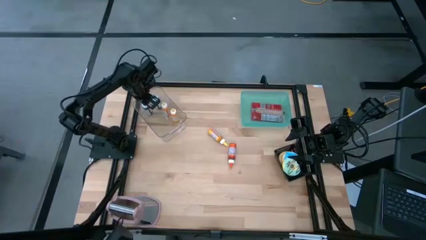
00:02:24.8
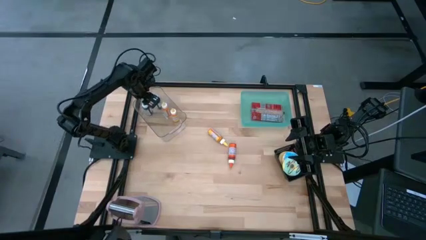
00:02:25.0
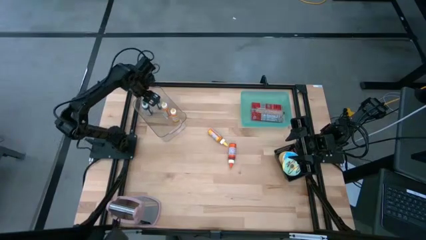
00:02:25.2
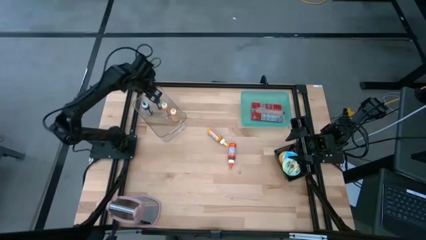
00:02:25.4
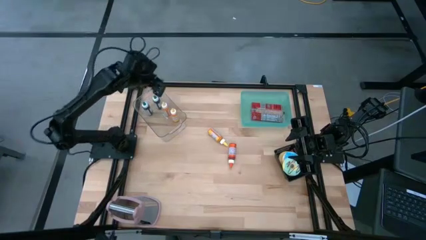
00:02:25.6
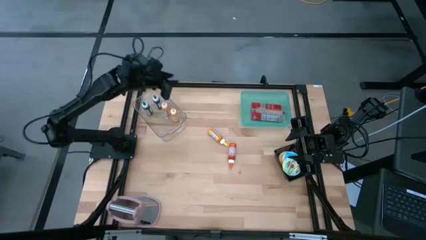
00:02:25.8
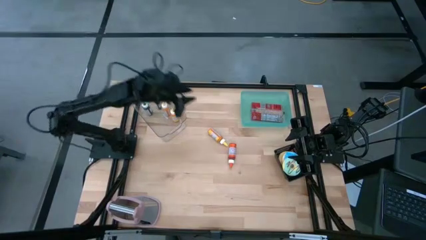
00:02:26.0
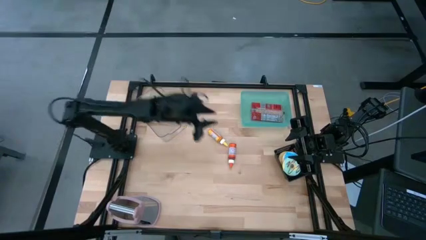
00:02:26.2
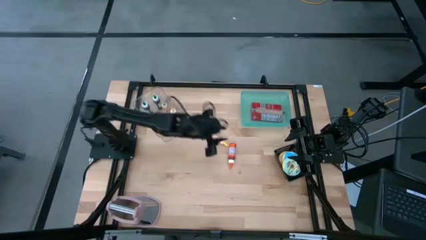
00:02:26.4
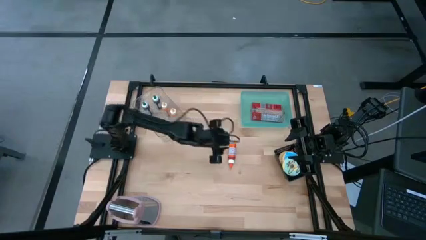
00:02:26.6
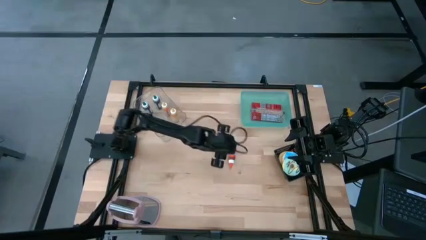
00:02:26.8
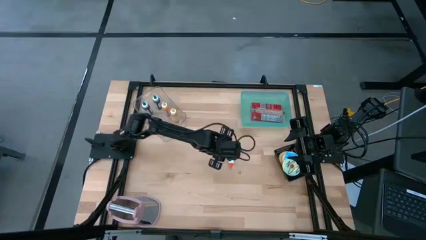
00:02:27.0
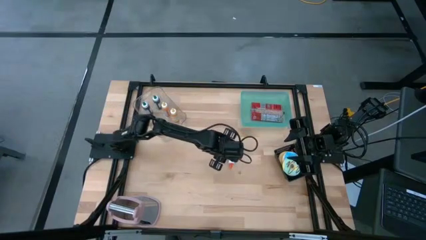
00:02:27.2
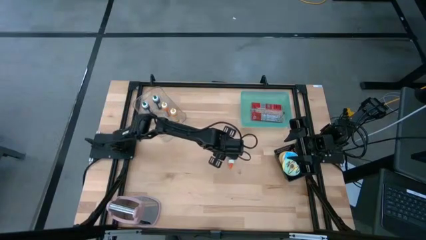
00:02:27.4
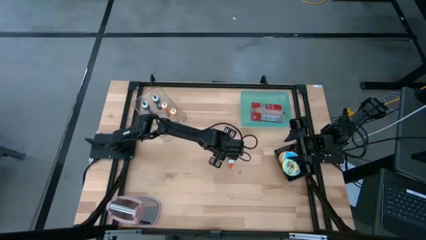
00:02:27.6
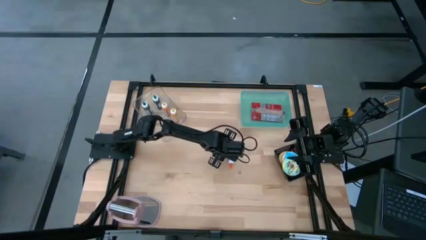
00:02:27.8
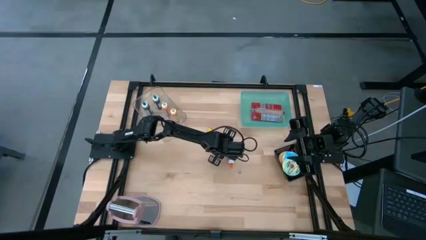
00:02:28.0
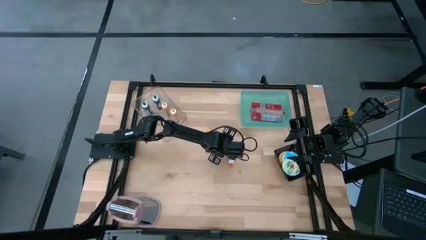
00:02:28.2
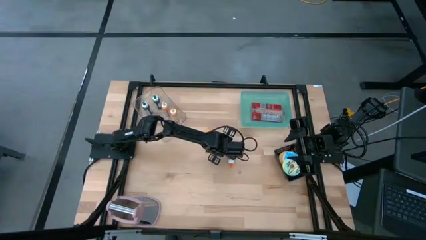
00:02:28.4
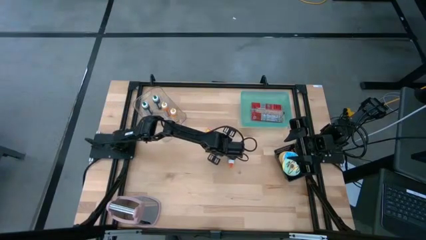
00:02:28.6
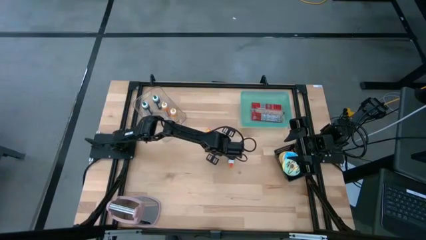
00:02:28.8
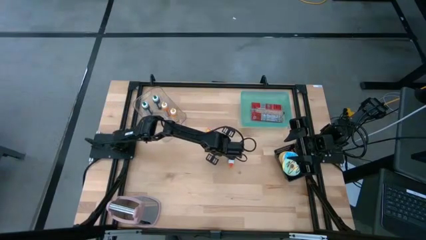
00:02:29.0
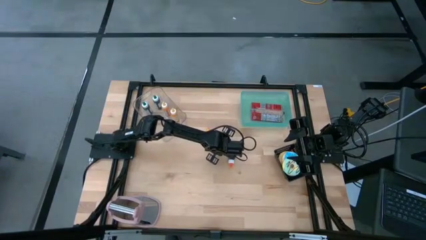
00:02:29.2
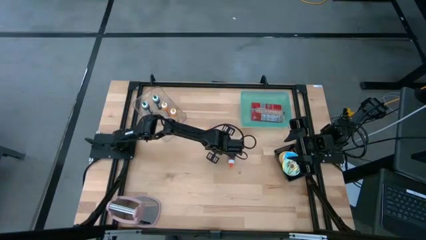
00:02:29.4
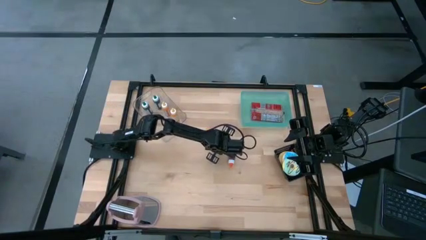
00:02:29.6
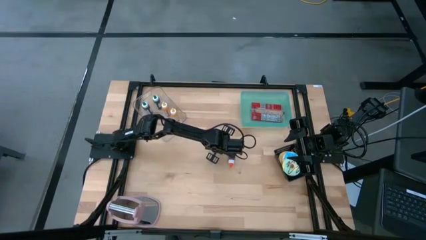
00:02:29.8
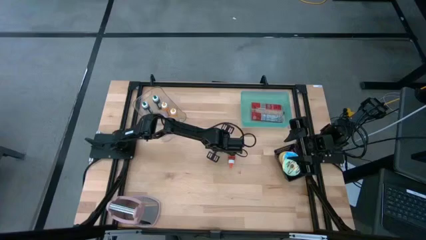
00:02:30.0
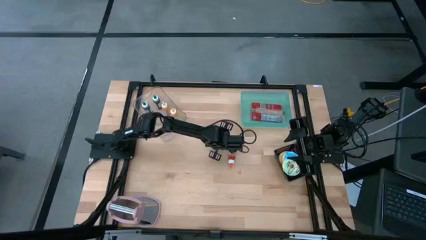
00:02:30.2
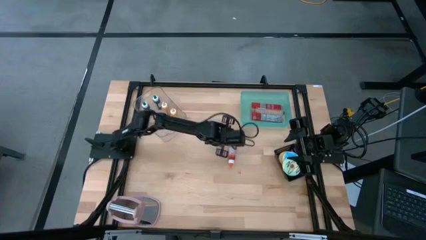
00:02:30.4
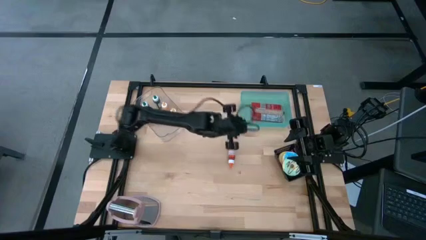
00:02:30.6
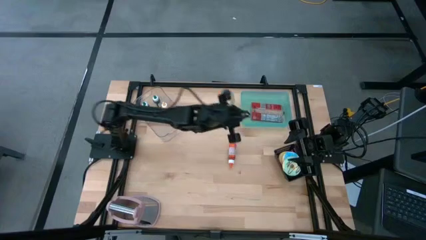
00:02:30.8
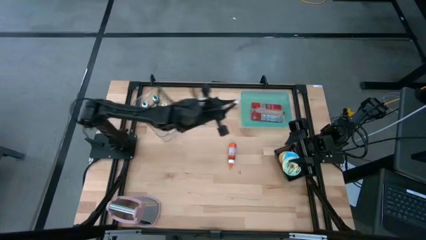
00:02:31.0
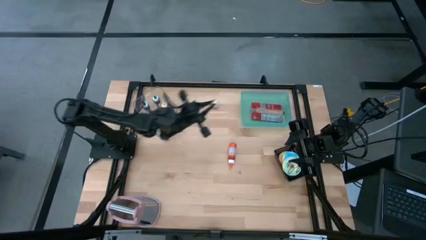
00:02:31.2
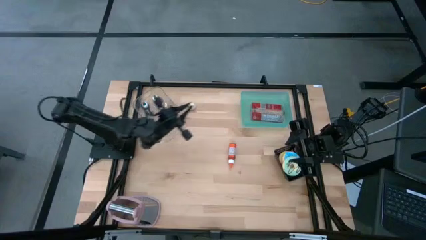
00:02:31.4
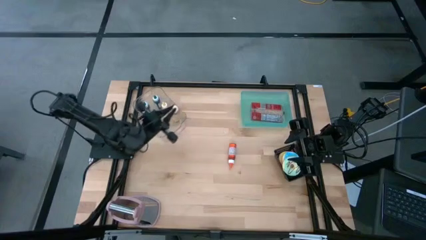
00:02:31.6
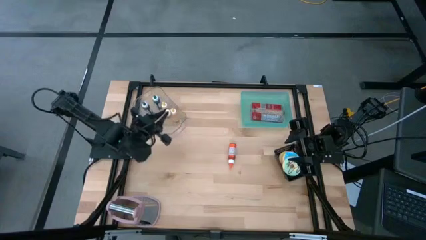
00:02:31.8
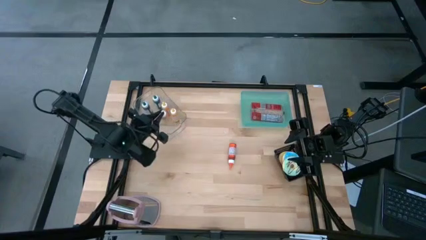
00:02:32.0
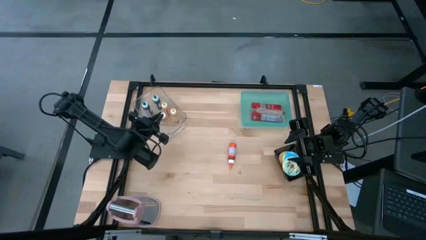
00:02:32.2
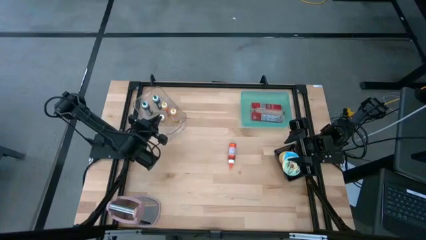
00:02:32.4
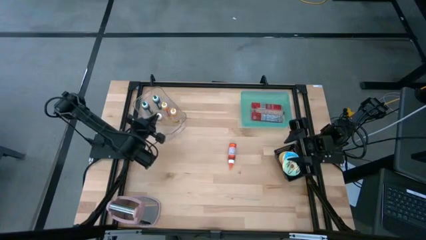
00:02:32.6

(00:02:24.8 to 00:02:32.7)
Put the yellow food coloring bottle into the transparent bin

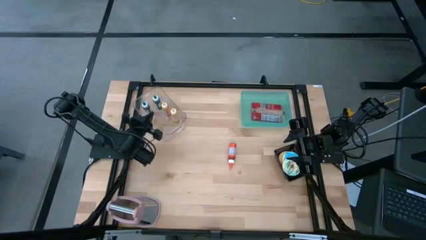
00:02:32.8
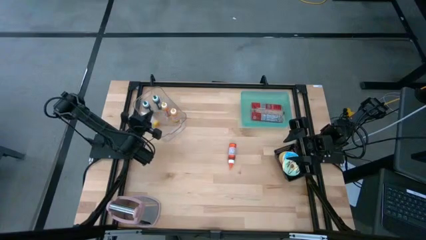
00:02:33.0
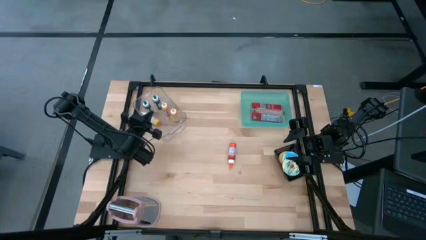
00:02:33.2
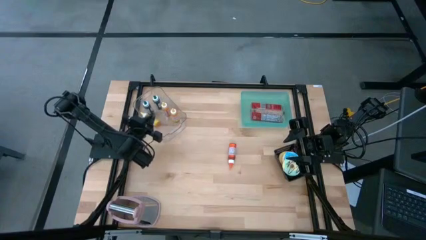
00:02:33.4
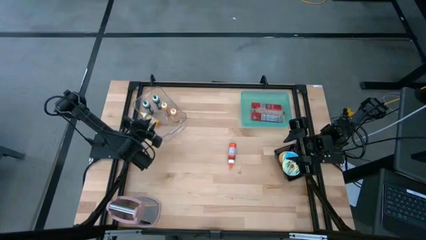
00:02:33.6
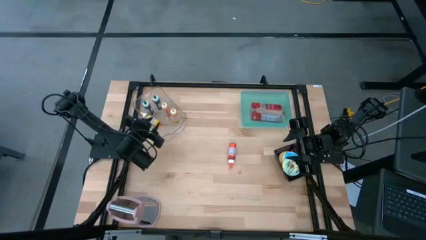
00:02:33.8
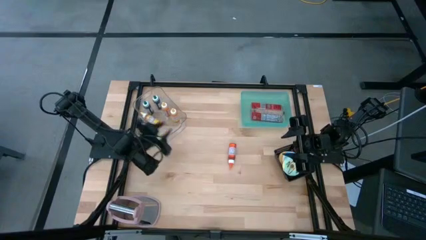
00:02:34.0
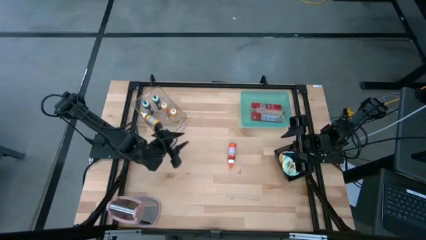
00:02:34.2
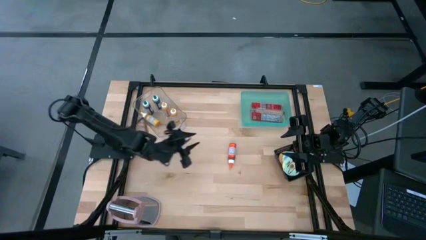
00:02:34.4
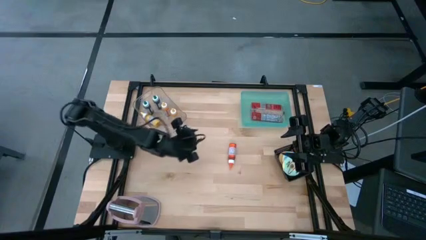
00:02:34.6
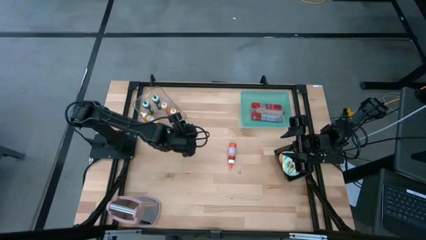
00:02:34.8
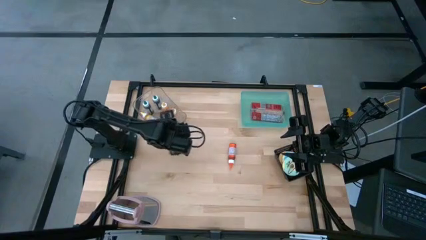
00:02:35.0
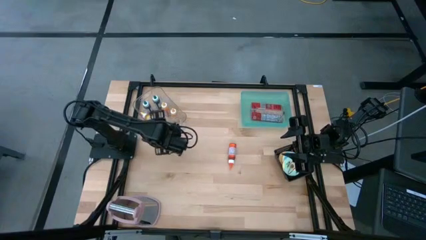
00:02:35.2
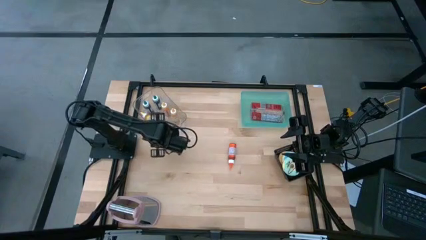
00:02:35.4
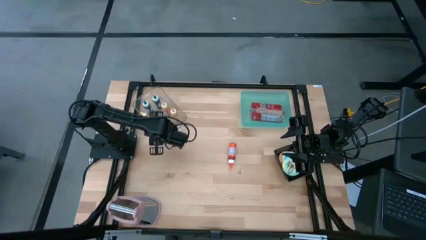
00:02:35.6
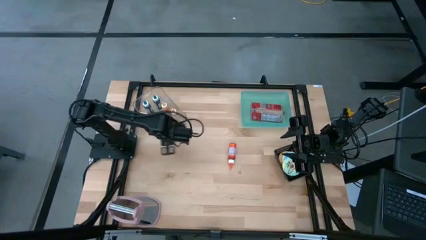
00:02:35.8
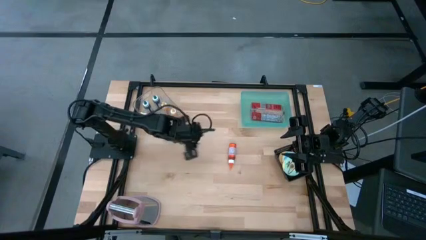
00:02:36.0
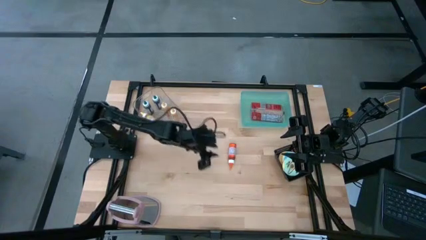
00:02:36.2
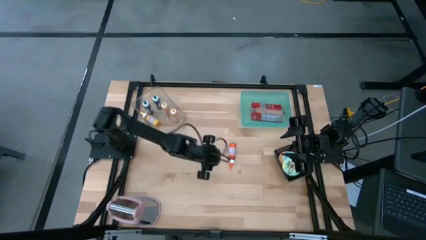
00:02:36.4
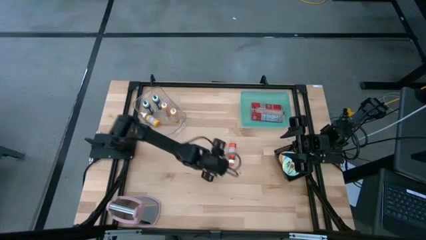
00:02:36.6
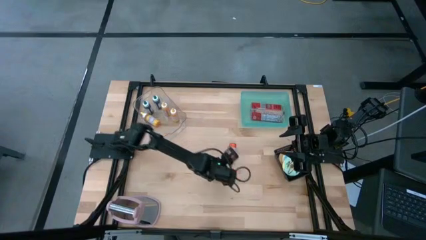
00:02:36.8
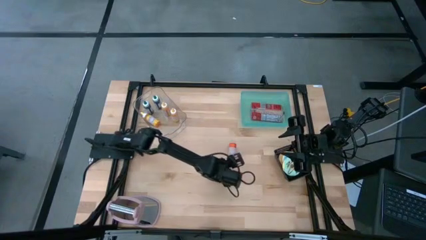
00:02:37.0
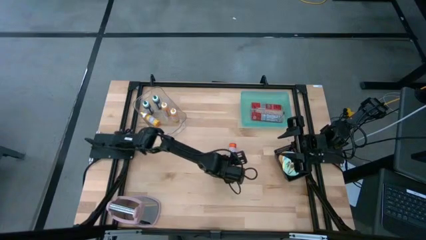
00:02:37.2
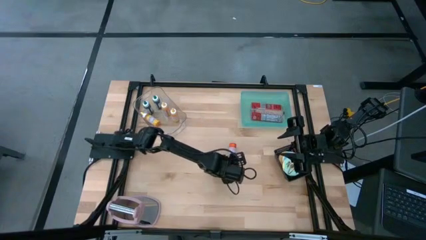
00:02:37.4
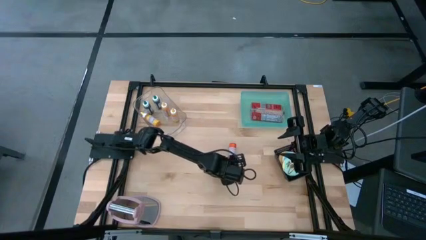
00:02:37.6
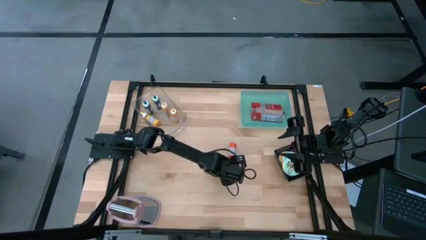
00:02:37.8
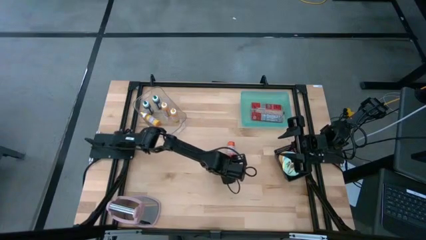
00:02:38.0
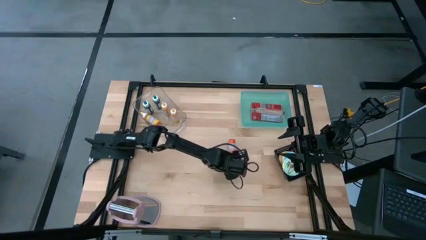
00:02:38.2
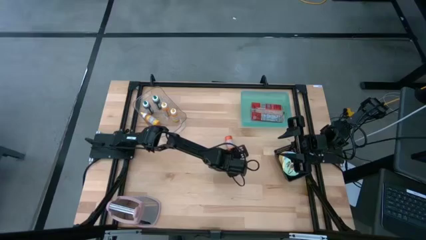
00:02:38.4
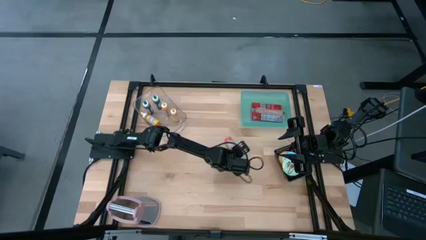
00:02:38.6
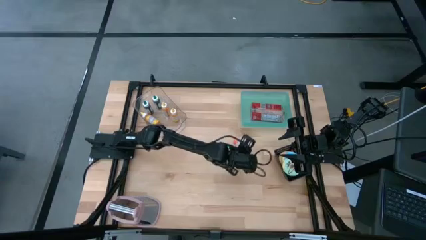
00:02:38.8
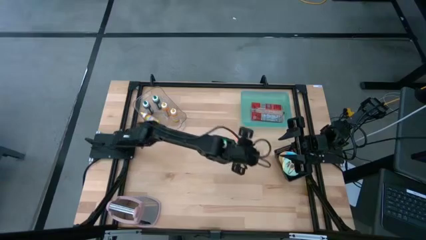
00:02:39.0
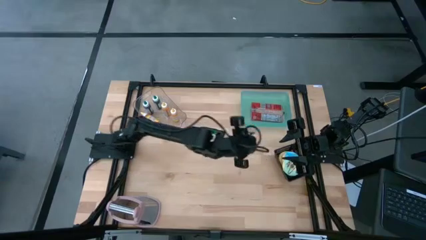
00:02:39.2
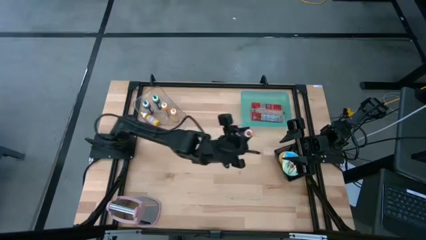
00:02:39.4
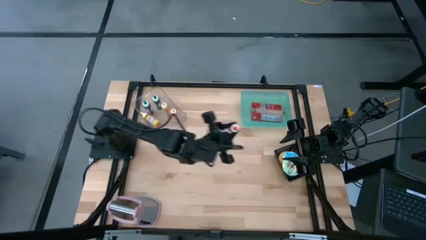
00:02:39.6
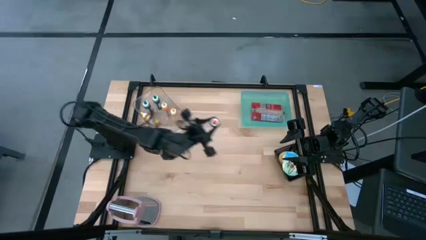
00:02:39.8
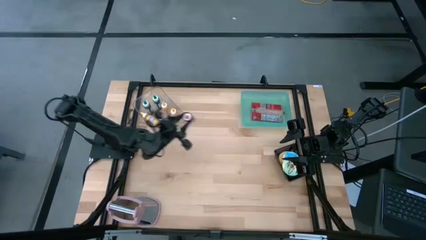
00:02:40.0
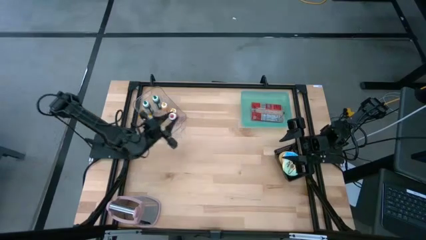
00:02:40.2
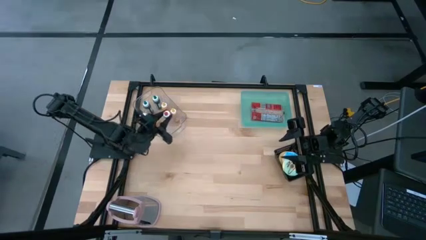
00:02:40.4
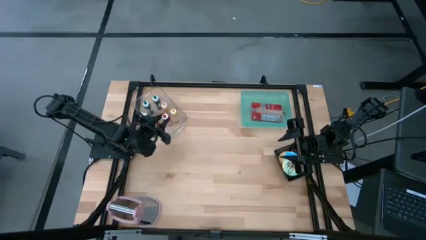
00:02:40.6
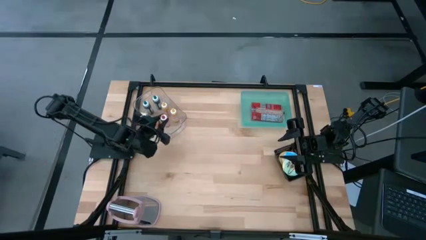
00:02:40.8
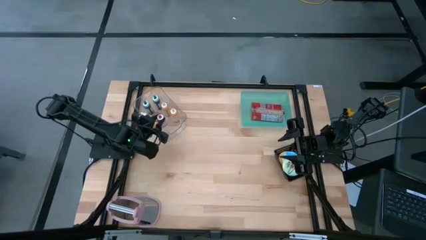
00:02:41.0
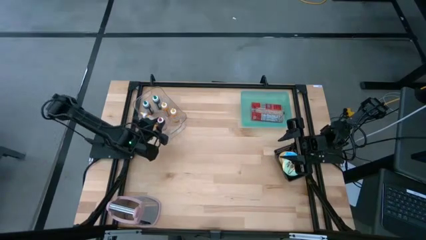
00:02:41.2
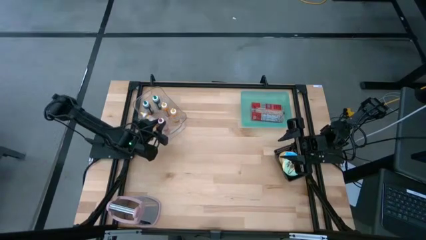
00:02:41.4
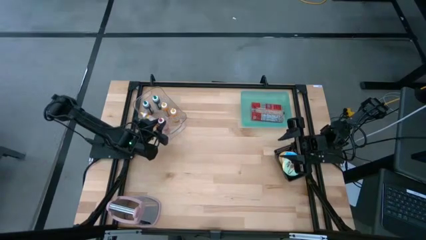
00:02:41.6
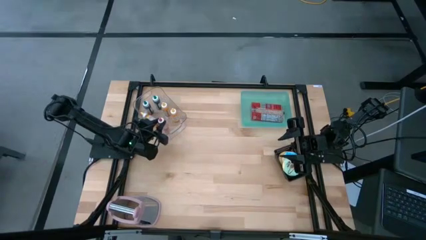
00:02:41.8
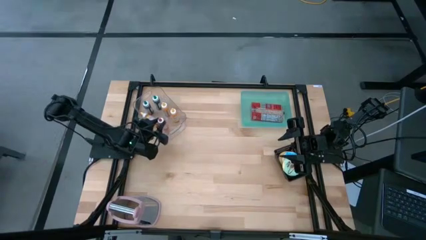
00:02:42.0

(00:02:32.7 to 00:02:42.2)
Put the orange food coloring bottle into the transparent bin
